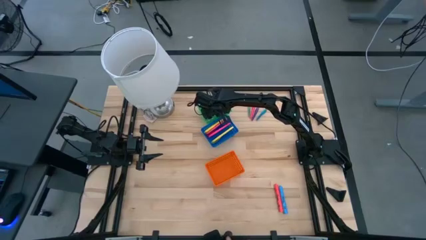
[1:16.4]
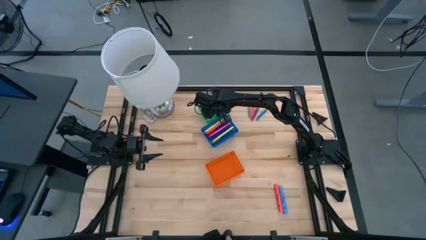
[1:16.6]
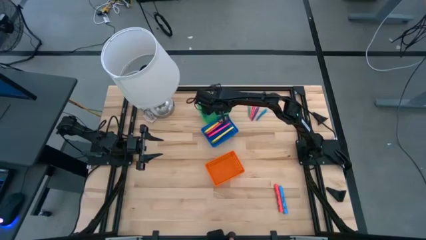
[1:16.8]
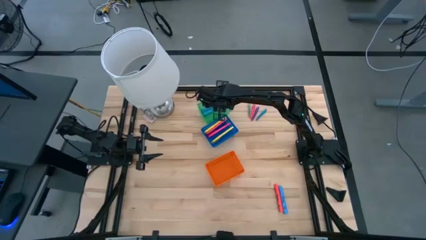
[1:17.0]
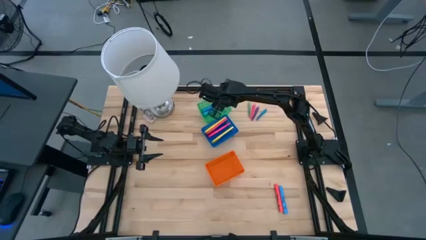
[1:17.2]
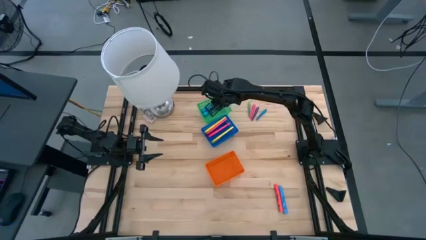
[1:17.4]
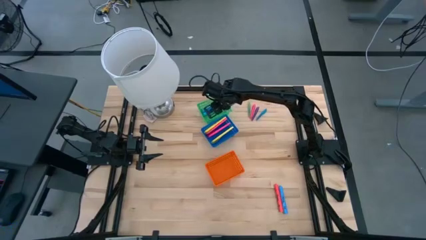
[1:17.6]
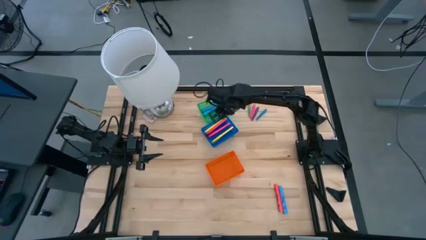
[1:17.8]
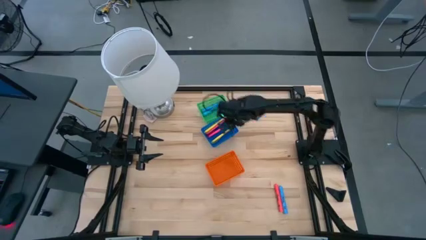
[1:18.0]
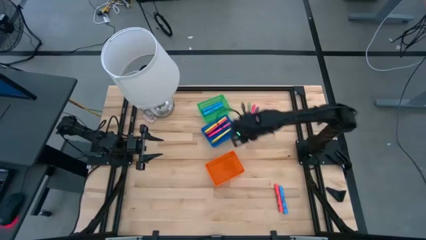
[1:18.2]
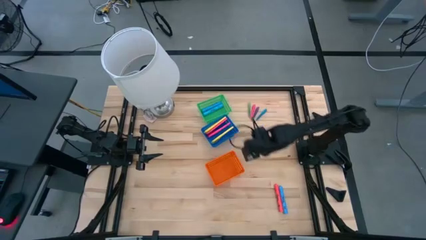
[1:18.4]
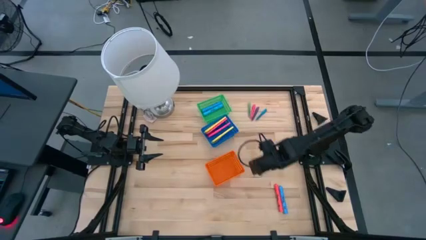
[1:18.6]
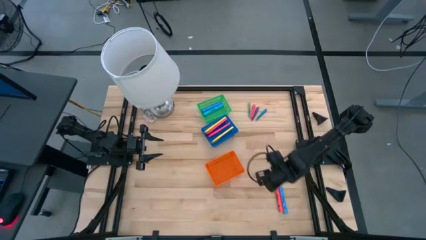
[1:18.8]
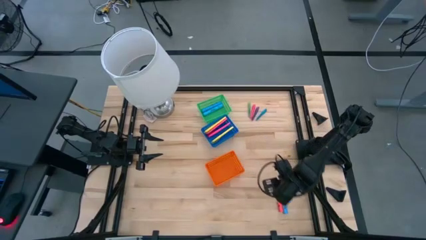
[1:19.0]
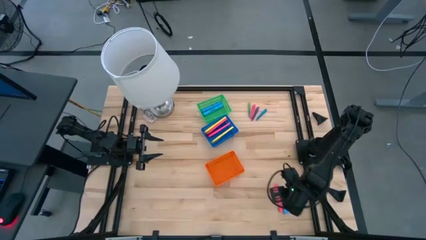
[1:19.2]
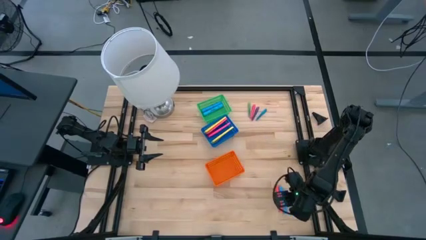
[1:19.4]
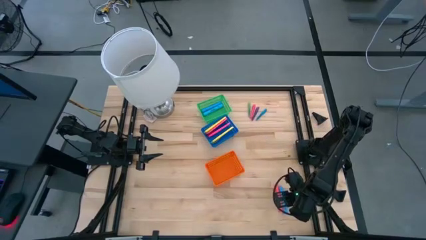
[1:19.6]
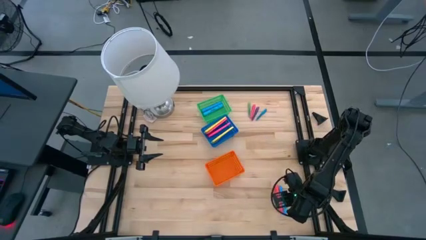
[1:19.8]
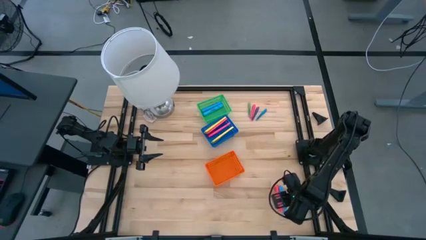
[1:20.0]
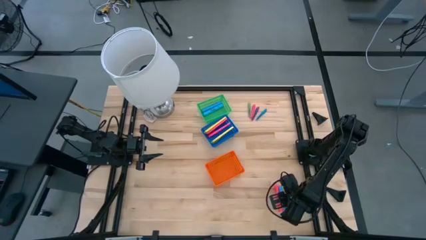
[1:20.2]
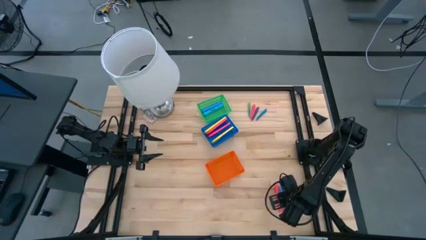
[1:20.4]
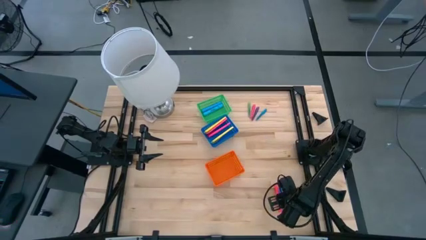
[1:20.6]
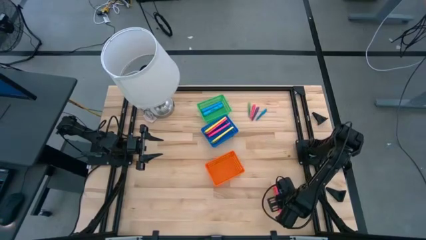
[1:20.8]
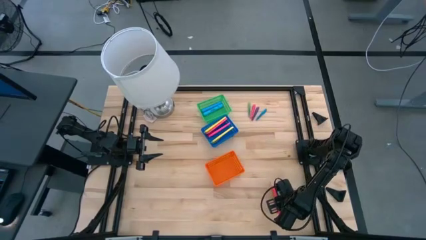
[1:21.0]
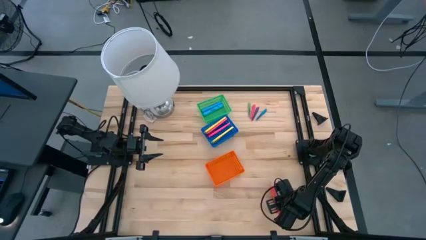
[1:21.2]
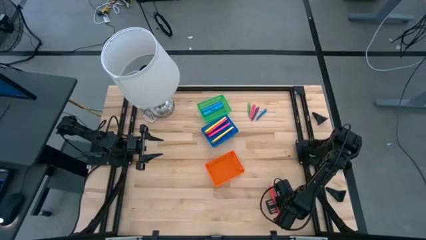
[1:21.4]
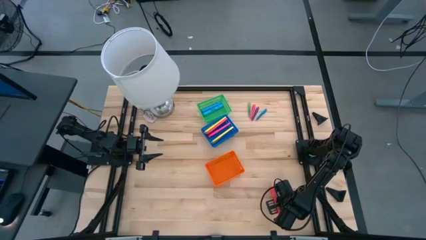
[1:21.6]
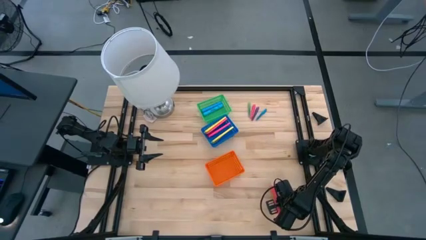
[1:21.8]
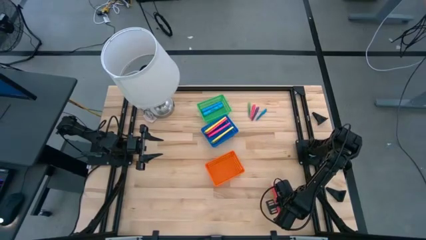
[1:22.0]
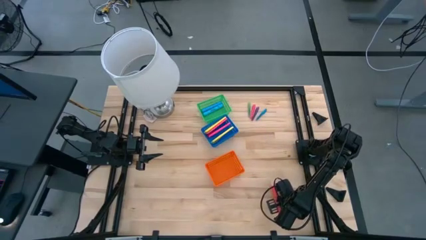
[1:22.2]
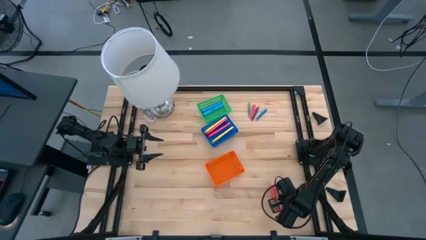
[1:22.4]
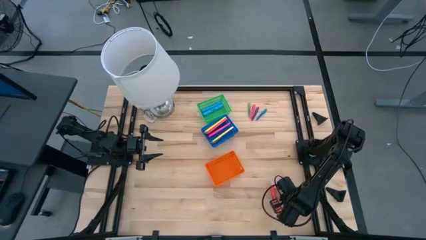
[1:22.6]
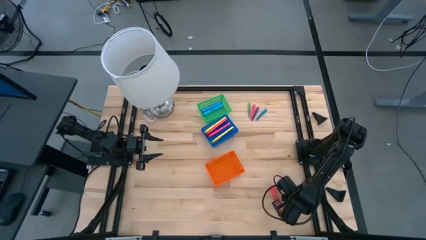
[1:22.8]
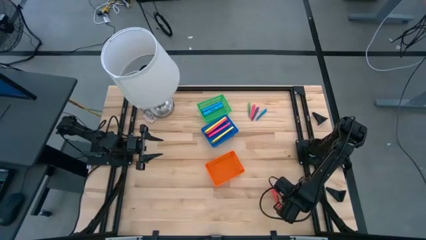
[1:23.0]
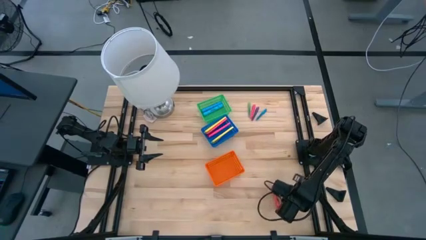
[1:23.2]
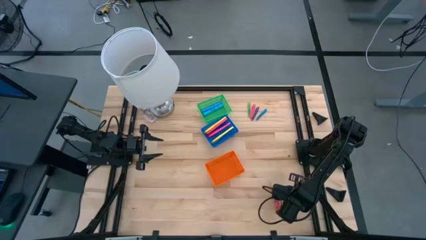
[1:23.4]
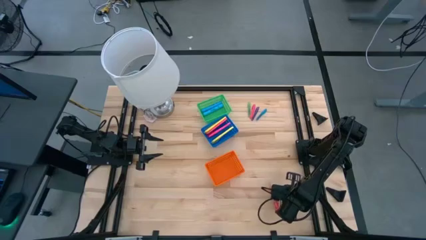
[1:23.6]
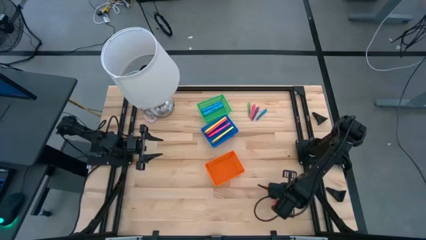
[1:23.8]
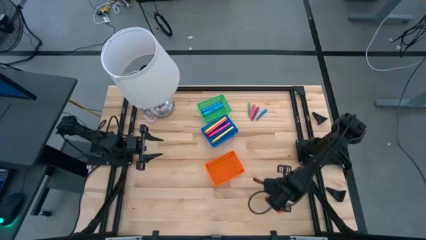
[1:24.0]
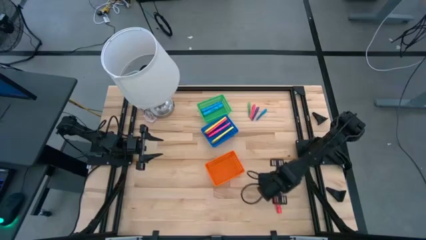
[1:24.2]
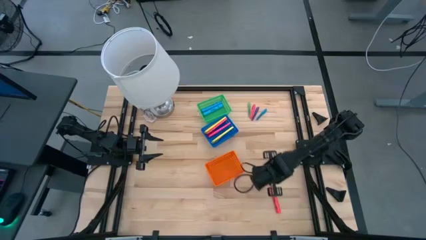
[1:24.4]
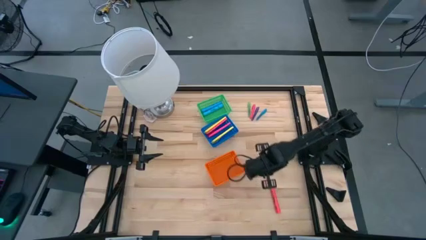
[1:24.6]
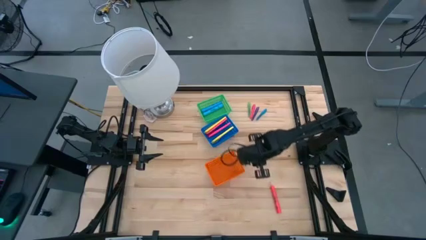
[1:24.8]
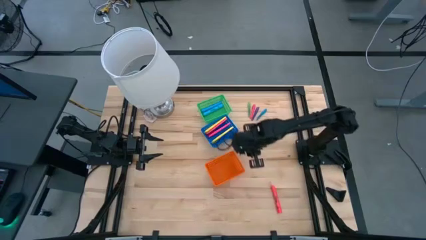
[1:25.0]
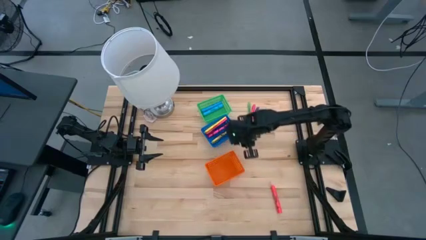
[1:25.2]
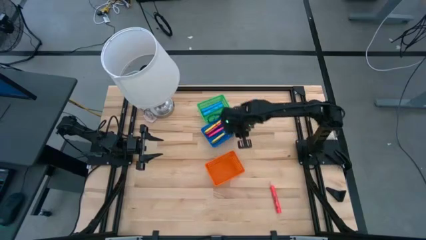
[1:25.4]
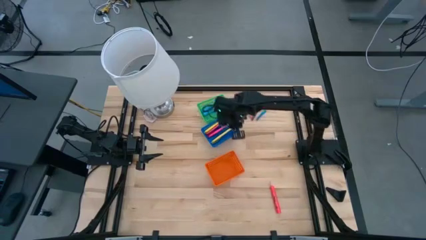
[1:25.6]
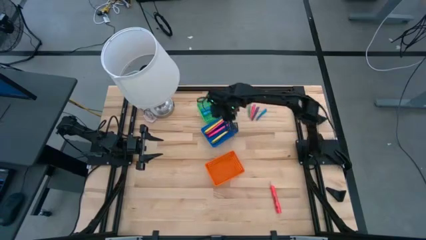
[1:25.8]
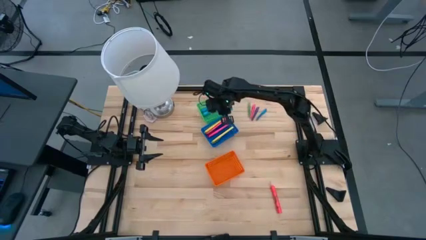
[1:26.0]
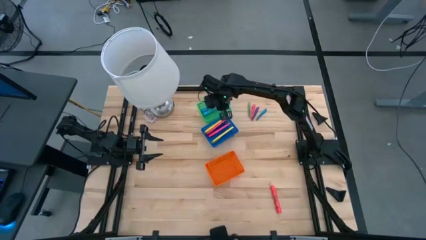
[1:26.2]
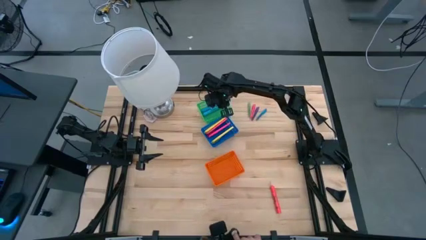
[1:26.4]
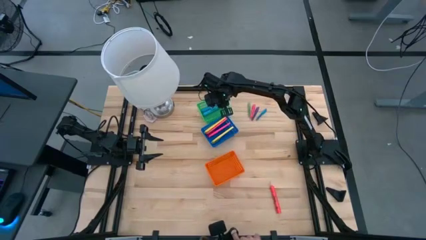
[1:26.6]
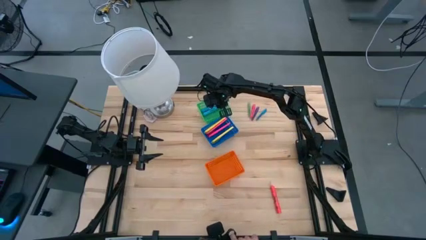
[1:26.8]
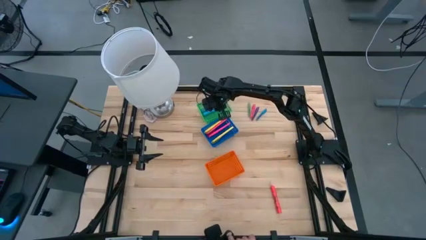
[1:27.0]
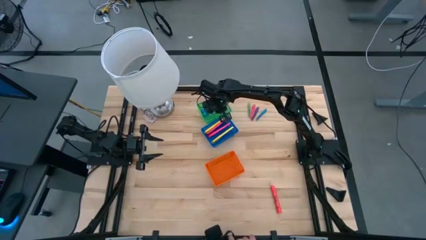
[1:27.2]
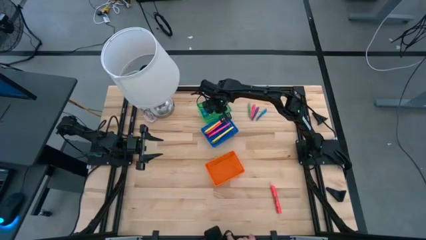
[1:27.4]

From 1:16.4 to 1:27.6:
Task: Pick & Place Markers
Put the blue highlighter pen into the green bin

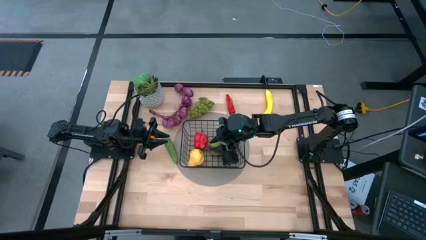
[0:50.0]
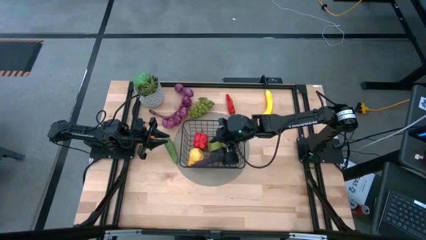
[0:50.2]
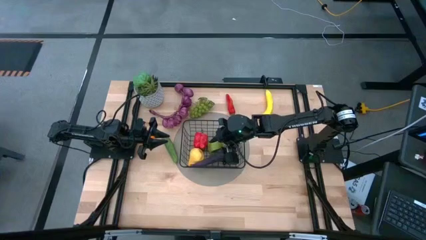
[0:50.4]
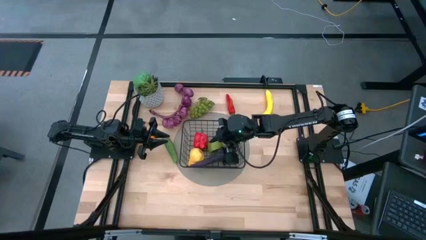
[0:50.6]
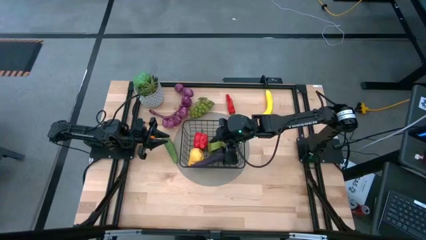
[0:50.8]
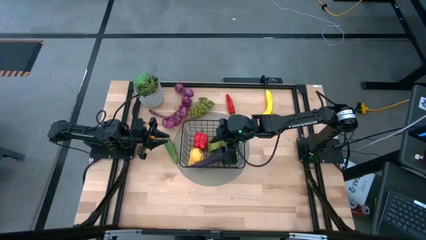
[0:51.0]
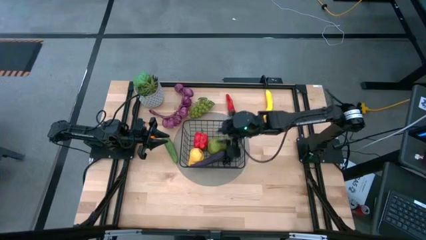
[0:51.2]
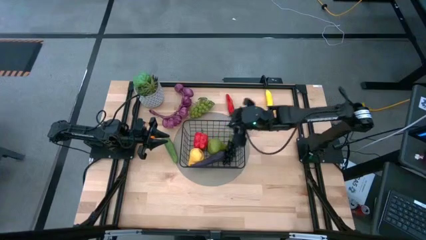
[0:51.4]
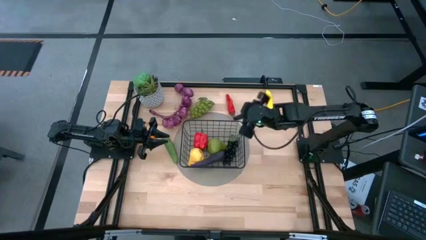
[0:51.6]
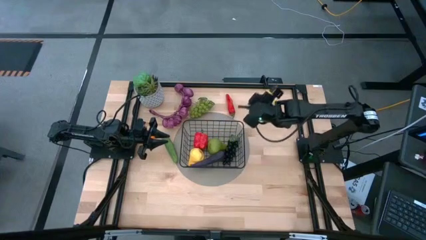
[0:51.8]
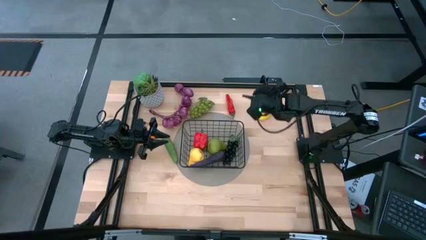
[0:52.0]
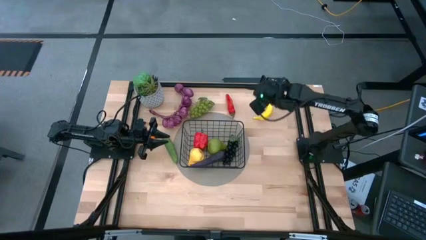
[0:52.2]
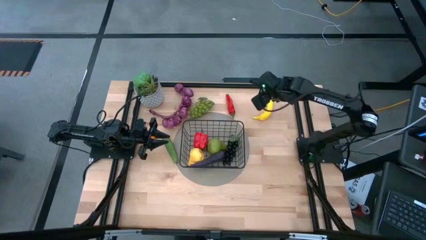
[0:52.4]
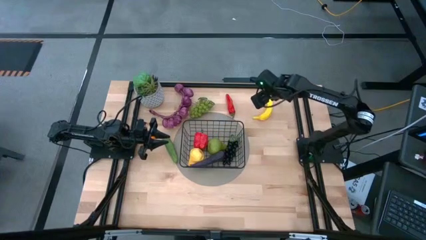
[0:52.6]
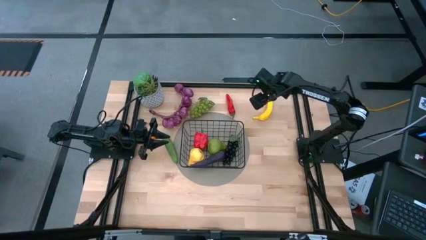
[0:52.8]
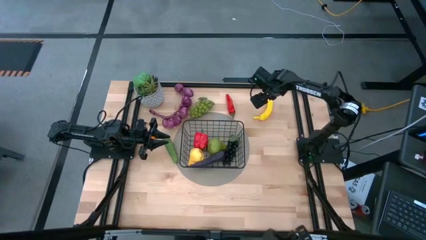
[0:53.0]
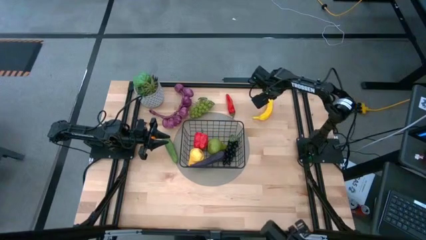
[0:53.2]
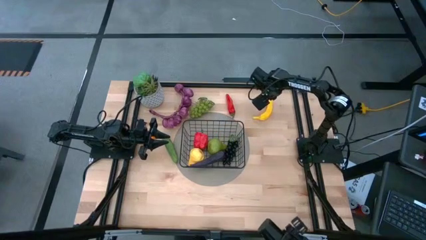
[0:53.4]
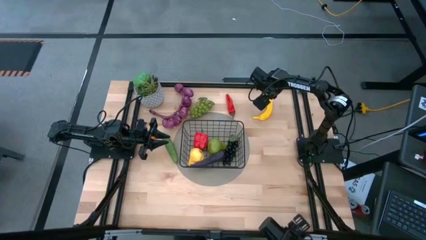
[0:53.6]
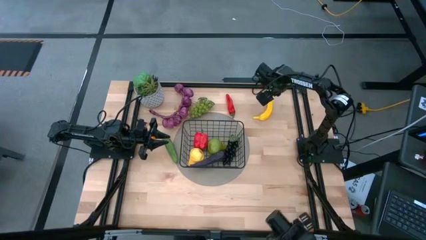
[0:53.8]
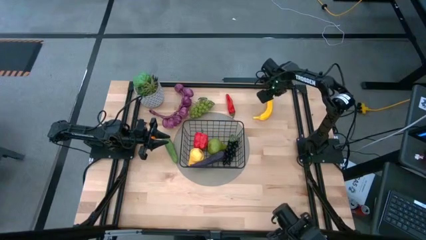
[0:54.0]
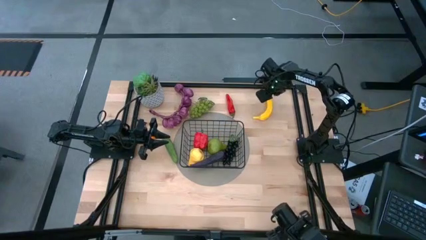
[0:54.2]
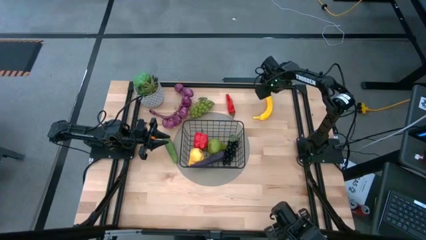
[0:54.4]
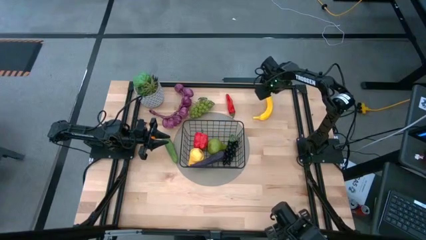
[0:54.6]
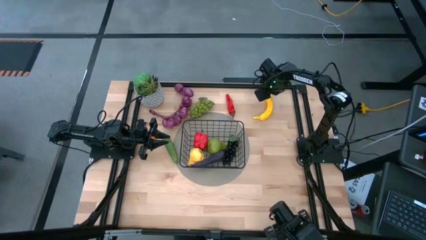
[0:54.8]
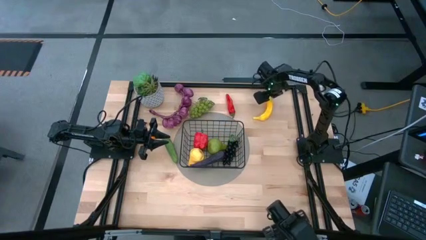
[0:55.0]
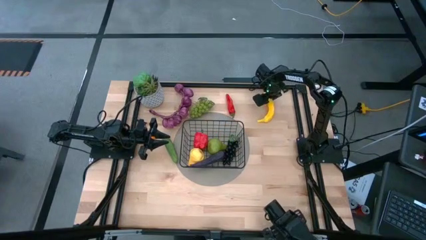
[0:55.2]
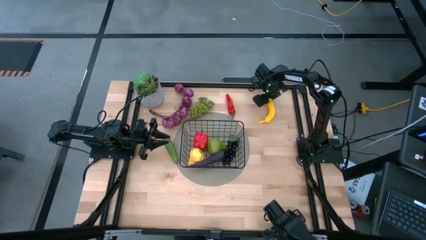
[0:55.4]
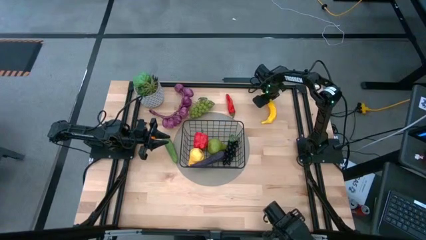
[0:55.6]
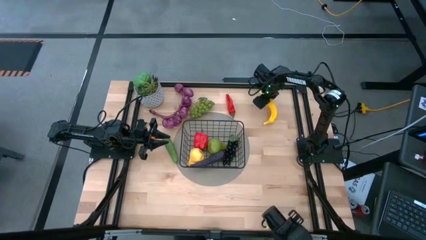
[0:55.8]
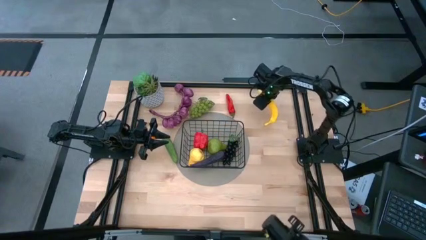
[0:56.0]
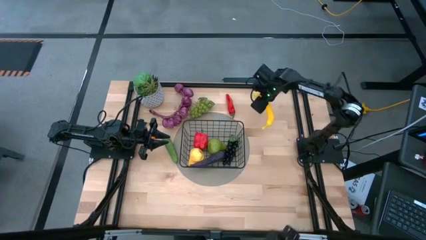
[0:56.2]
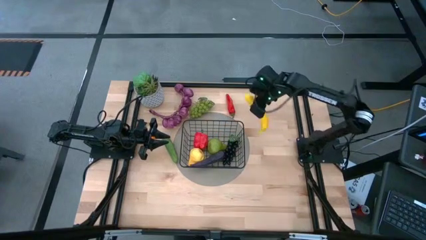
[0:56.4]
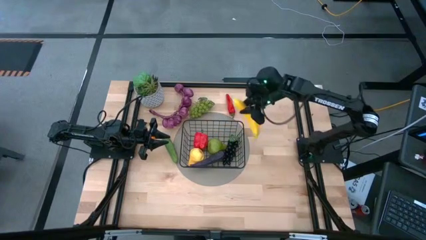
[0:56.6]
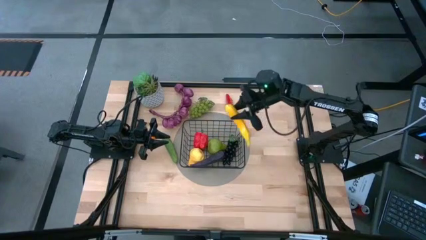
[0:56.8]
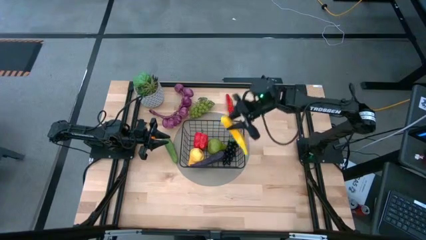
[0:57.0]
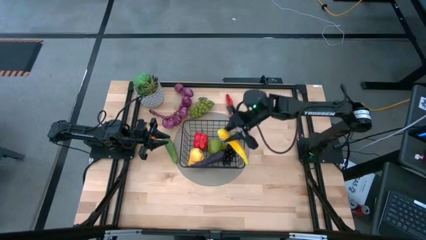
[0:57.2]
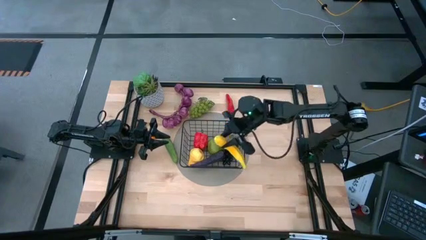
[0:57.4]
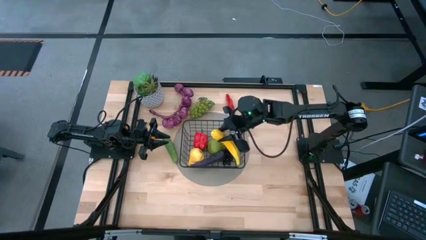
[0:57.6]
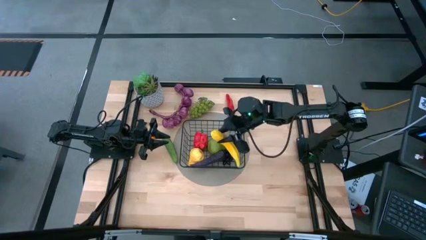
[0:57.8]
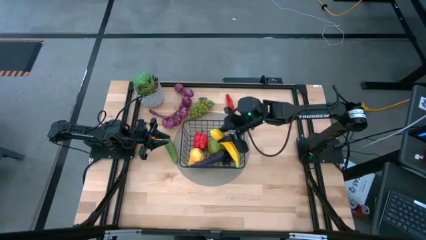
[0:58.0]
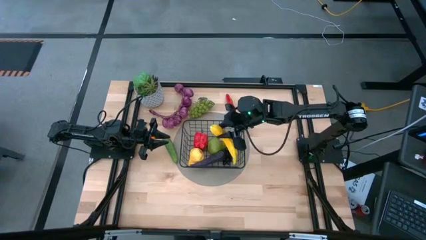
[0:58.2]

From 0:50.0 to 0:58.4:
Task: Build produce basket
Put the yellow banana into the black wire basket
